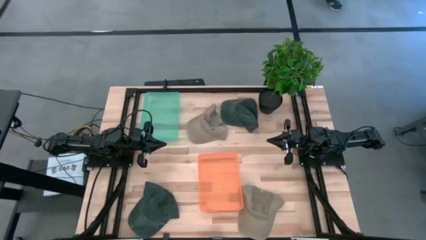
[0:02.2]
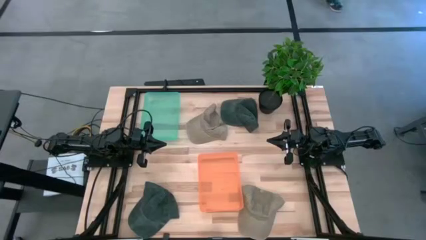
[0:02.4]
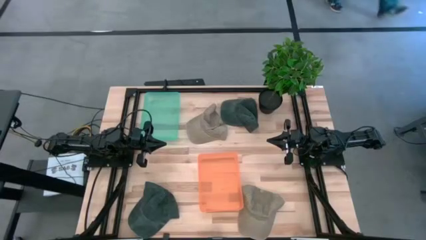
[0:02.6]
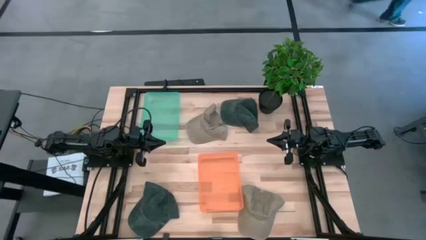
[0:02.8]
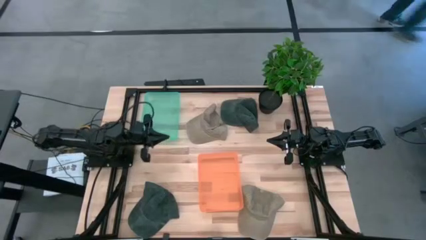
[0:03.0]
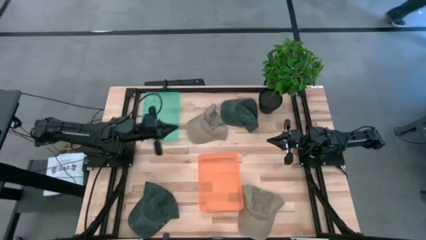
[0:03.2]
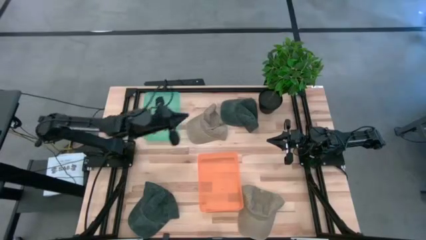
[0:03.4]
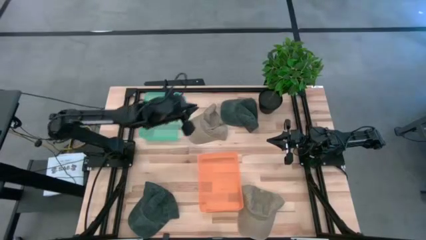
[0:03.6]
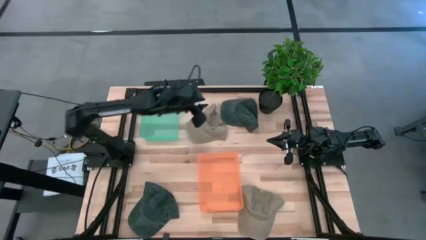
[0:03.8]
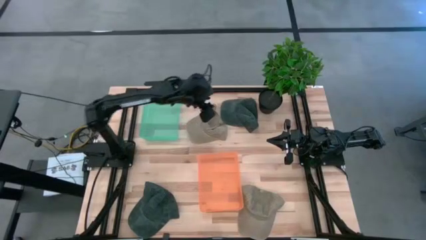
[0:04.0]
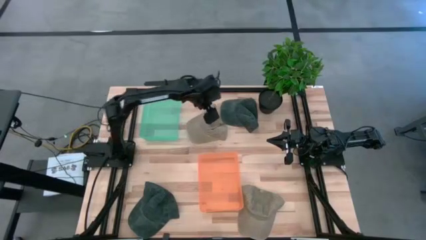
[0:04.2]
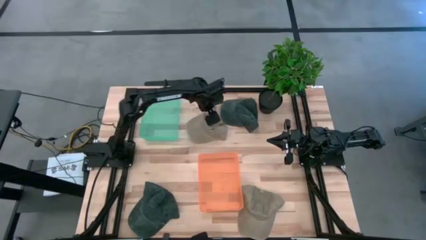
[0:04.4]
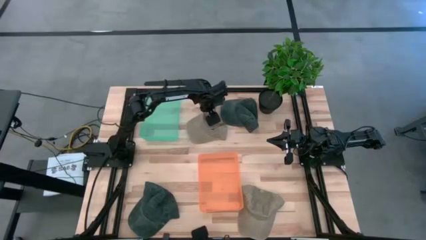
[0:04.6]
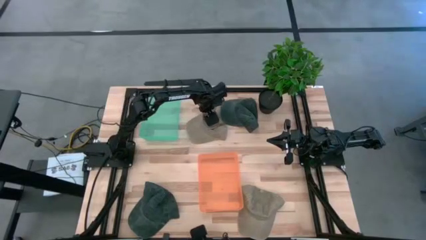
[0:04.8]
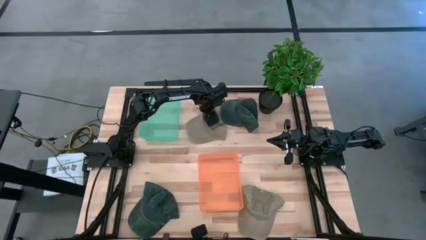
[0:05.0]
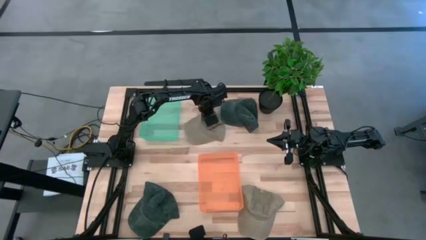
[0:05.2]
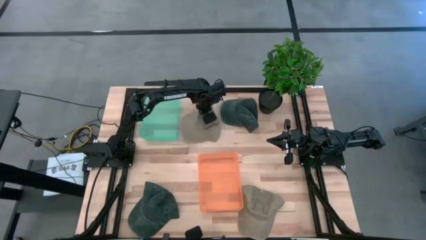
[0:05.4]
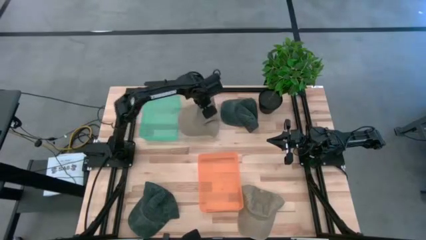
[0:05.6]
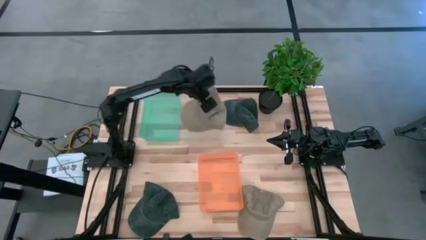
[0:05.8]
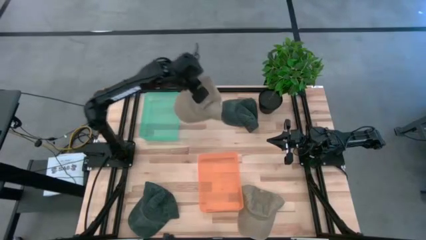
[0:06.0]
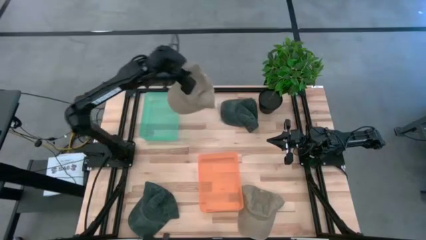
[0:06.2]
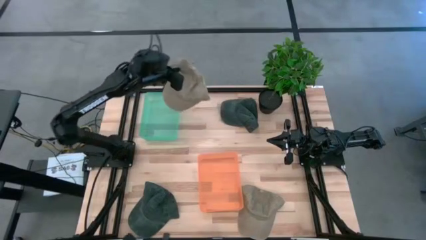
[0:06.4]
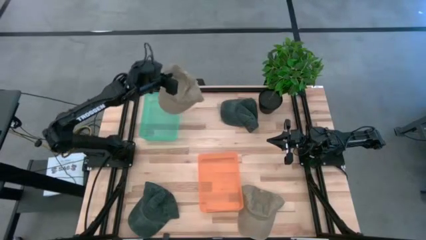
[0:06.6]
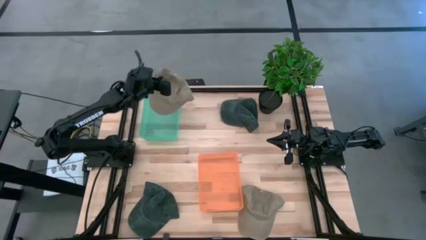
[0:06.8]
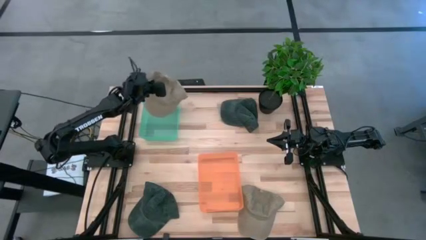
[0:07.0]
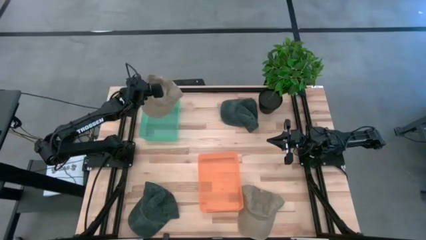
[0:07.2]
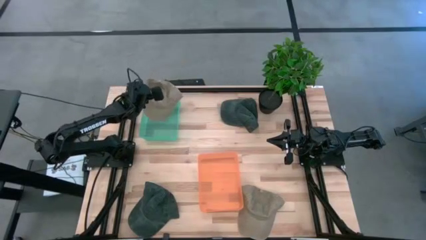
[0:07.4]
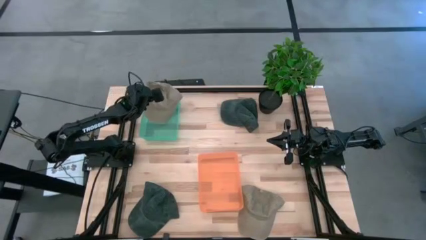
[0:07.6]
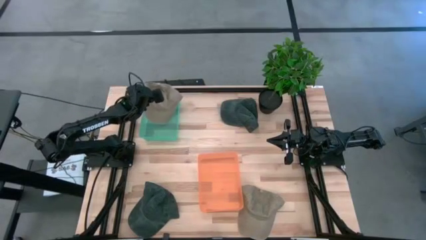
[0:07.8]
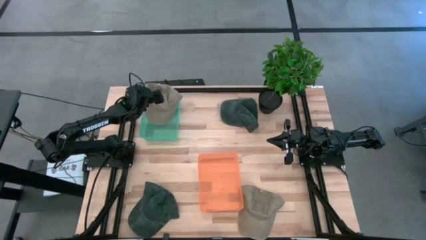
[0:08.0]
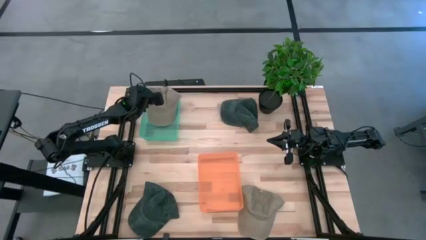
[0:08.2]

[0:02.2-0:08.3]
Task: Pick & Place hat
Put the top brown cap into the green bin

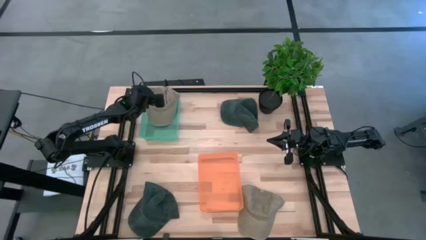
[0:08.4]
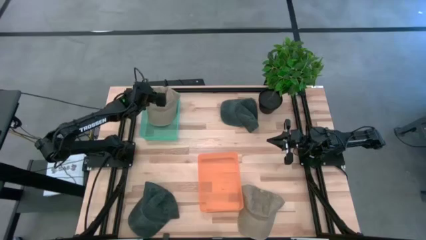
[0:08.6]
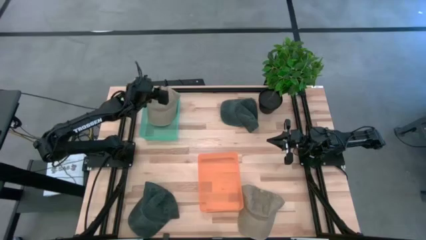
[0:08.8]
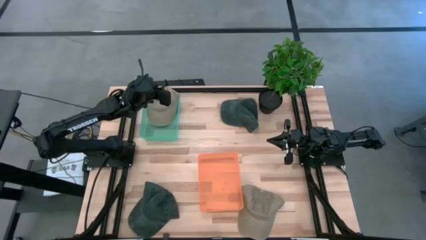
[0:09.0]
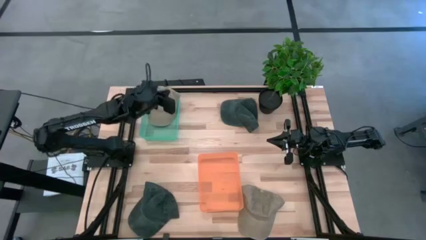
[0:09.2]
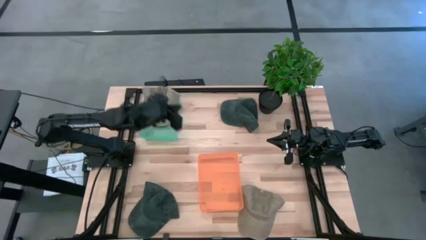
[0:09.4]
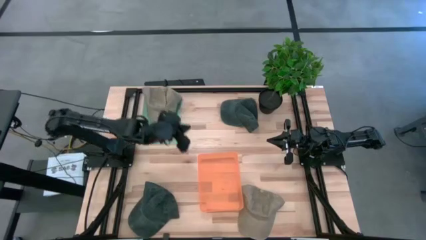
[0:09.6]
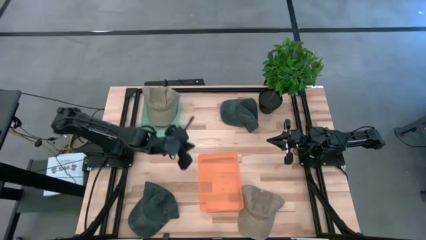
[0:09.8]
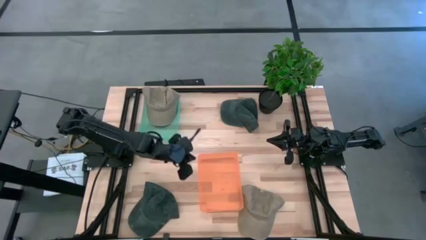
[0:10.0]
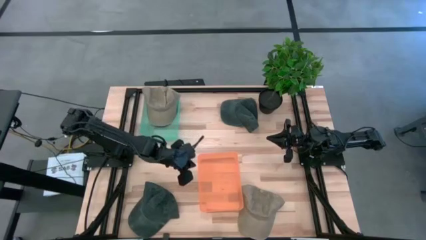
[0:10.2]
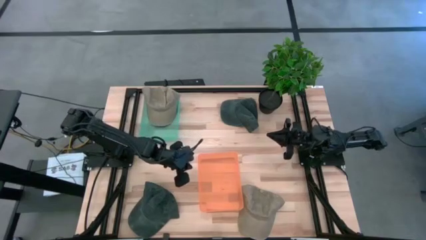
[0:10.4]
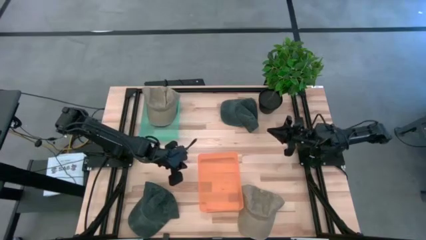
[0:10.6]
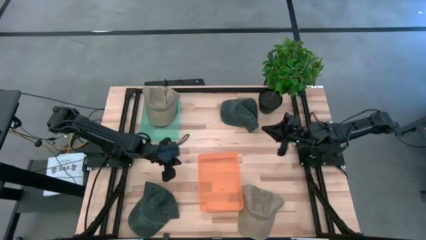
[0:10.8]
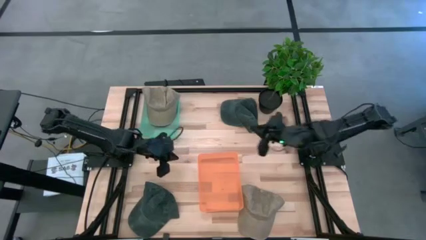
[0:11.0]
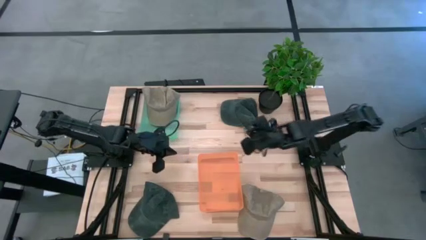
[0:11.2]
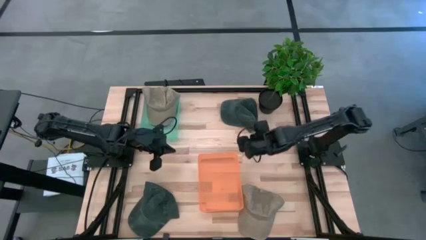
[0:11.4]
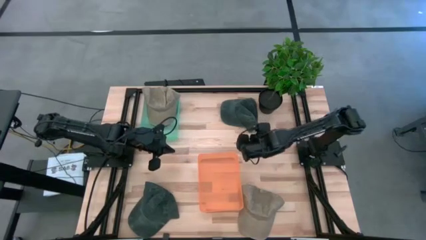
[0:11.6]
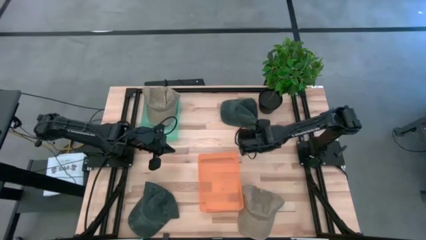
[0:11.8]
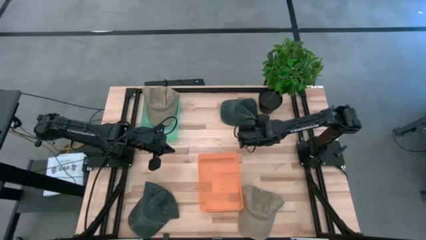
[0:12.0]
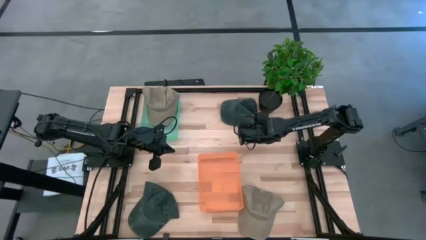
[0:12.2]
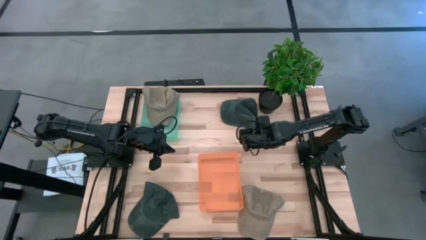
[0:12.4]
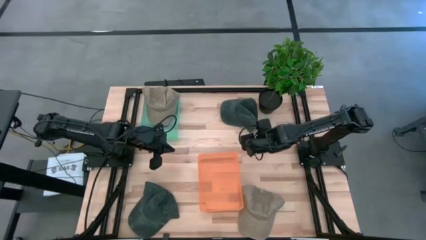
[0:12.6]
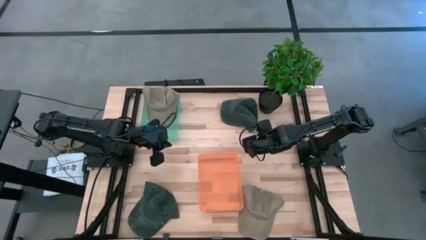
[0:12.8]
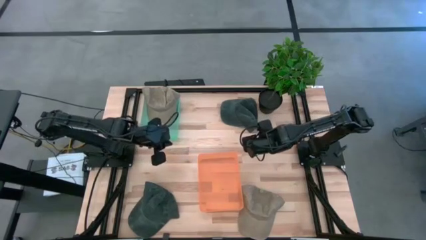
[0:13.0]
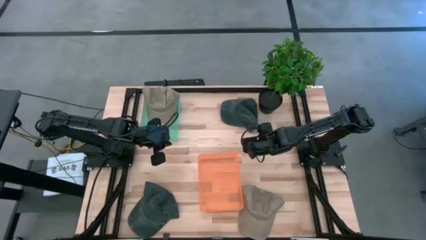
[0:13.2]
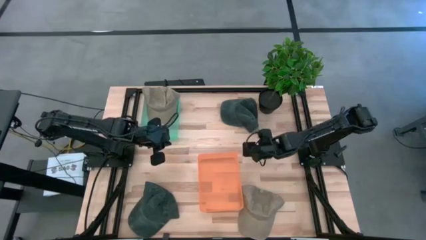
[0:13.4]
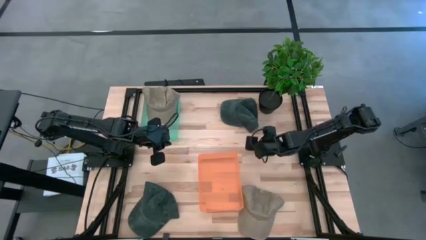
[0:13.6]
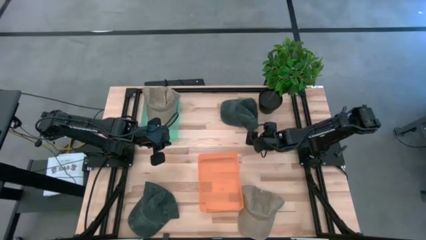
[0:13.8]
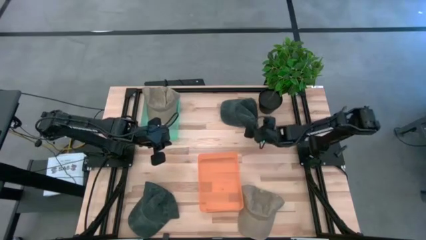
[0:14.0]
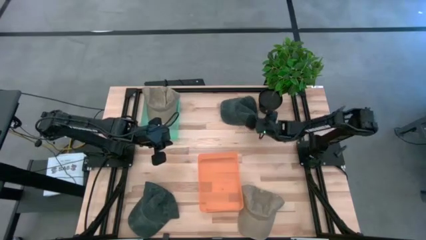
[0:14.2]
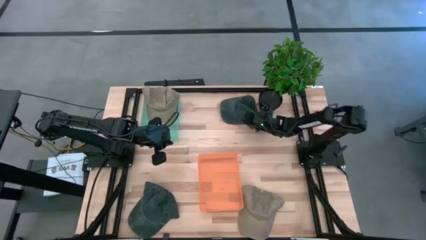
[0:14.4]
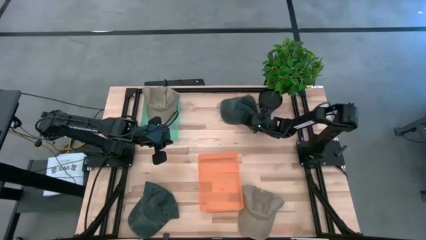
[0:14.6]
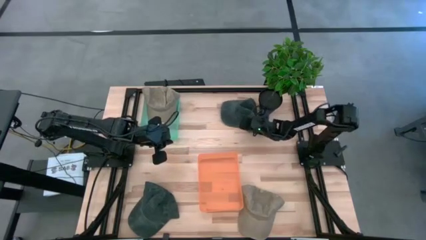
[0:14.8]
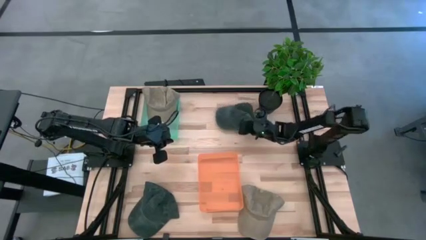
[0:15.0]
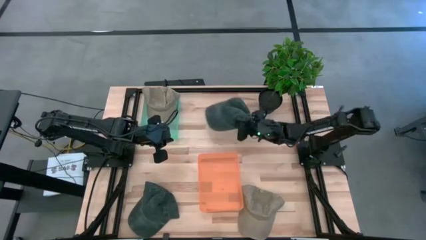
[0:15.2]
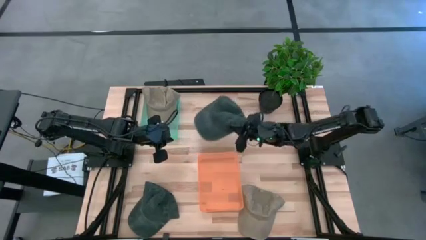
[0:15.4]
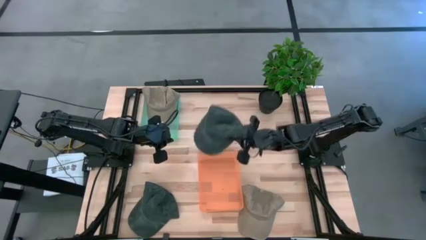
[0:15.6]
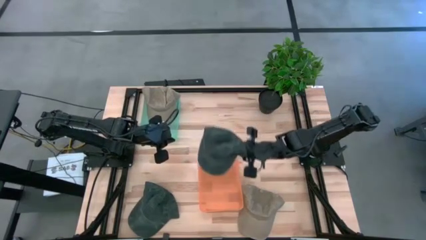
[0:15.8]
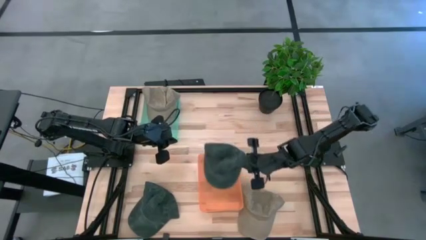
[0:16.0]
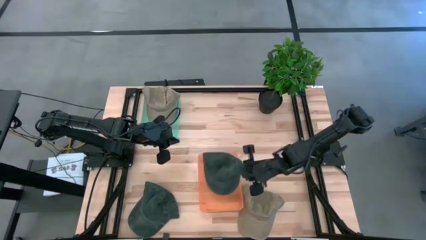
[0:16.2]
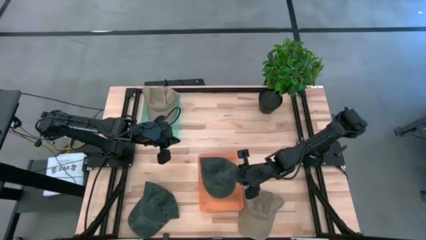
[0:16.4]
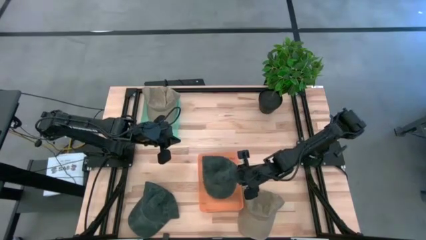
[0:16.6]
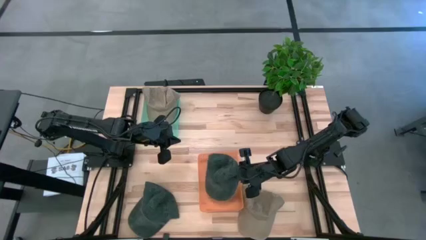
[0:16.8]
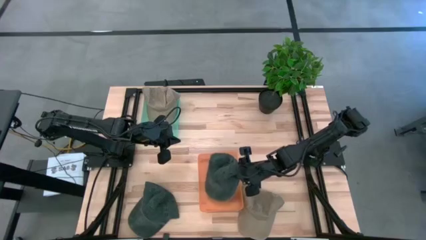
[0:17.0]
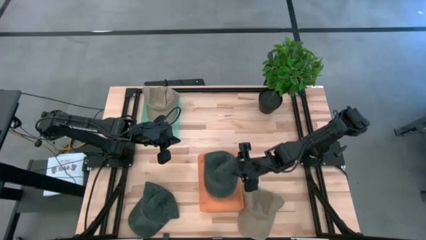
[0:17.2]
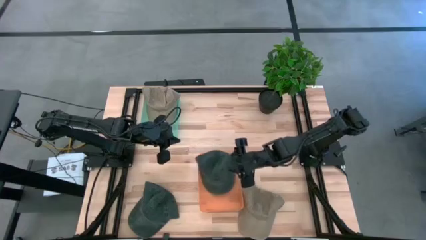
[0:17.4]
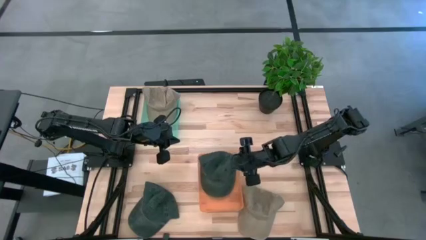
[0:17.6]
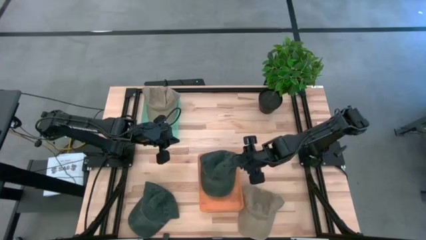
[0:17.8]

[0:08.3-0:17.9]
Put the top green cap into the orange bin

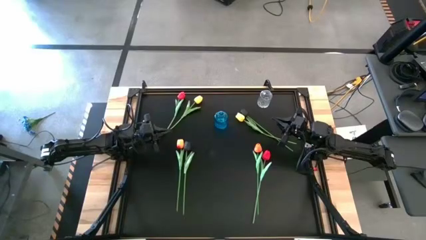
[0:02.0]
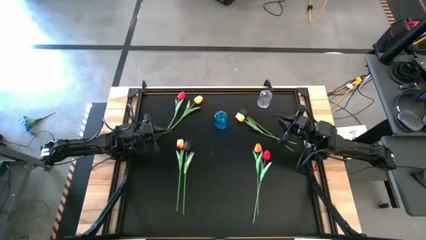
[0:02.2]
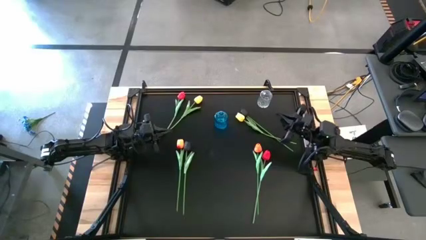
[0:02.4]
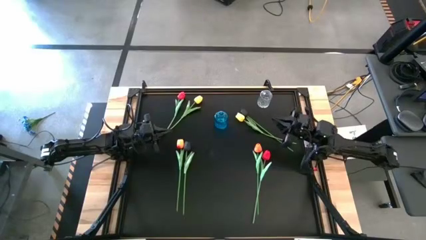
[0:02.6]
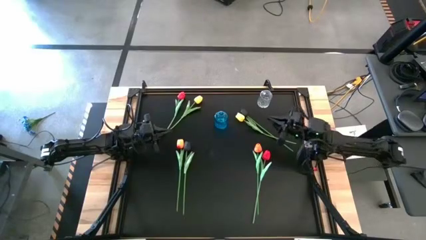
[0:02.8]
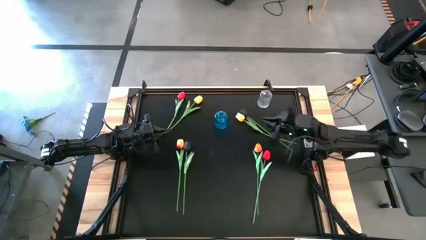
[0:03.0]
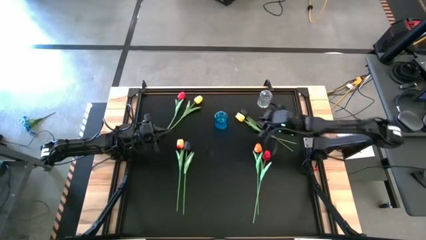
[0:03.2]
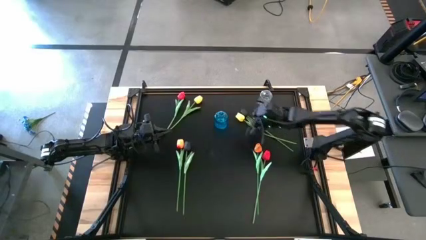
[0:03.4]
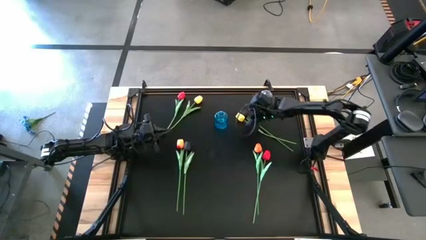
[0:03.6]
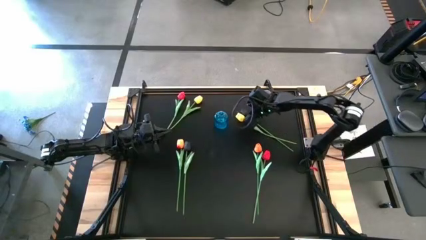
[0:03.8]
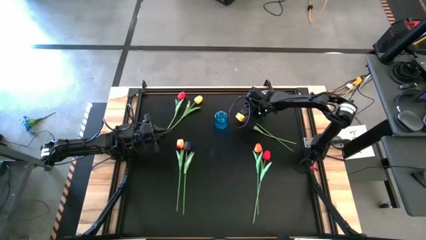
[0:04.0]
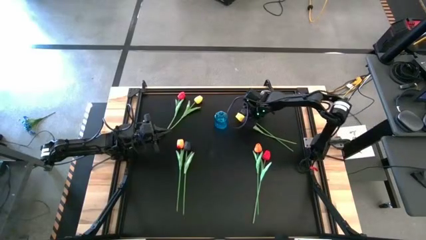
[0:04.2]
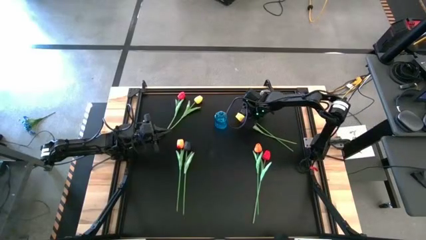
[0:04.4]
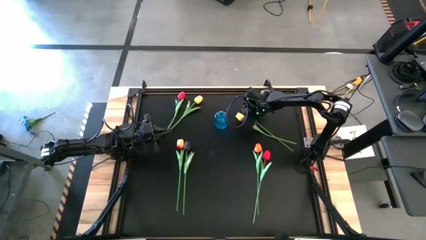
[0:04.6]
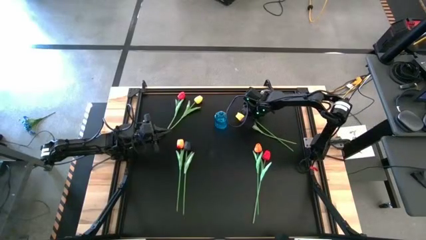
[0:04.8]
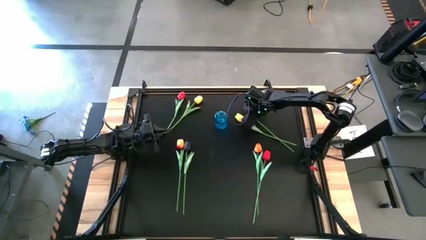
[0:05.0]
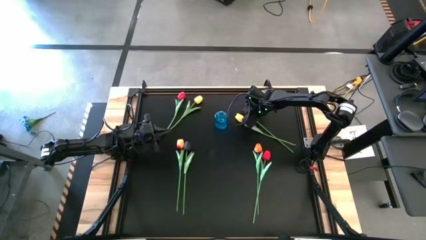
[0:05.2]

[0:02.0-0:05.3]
Task: Sort flowers into vase by color
Put the top black flower into the transparent blue vase
